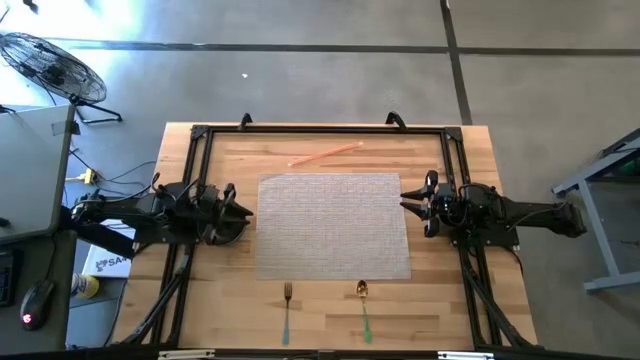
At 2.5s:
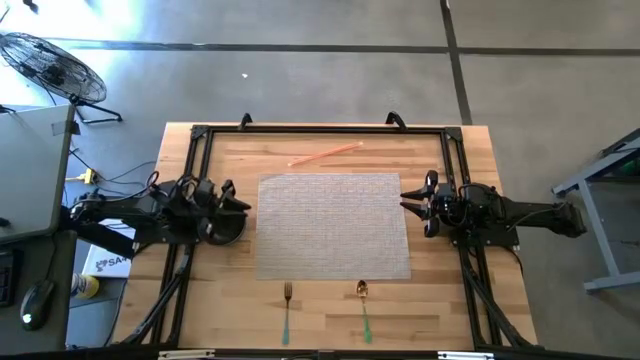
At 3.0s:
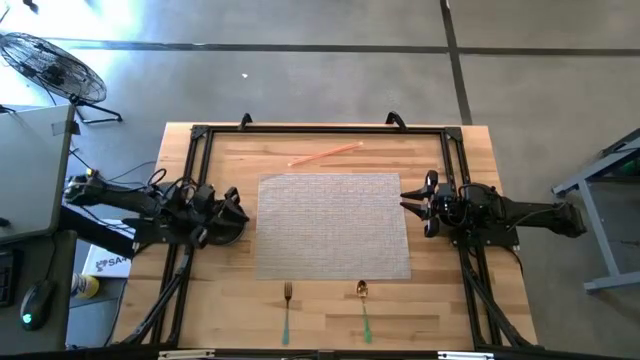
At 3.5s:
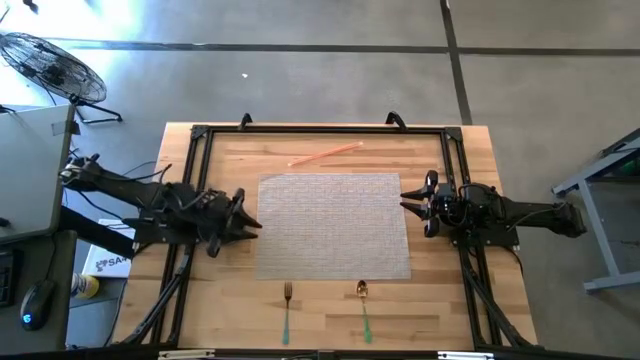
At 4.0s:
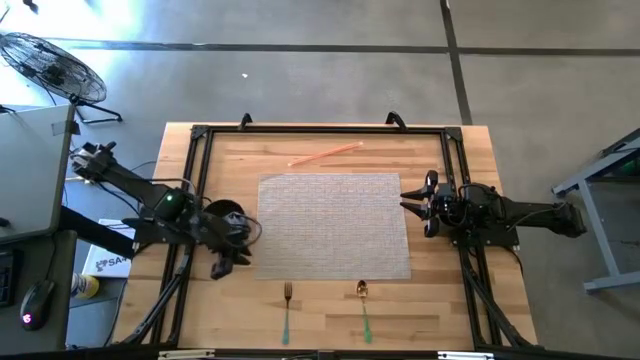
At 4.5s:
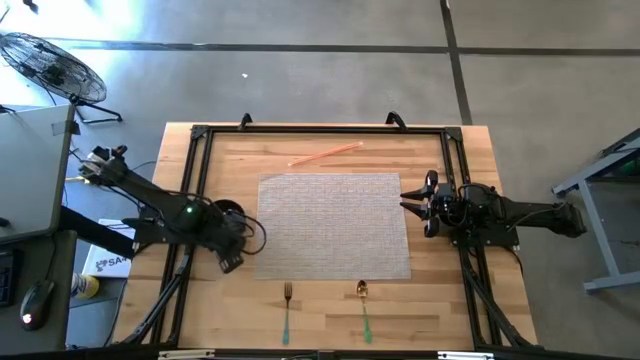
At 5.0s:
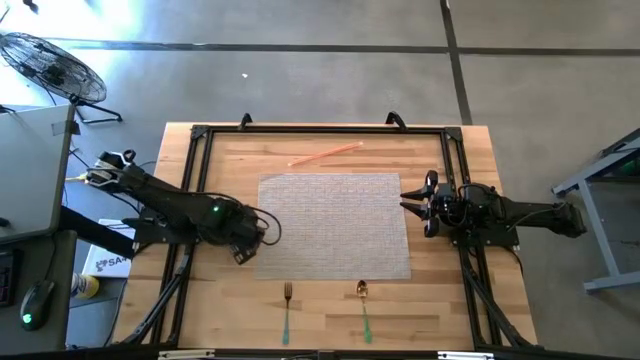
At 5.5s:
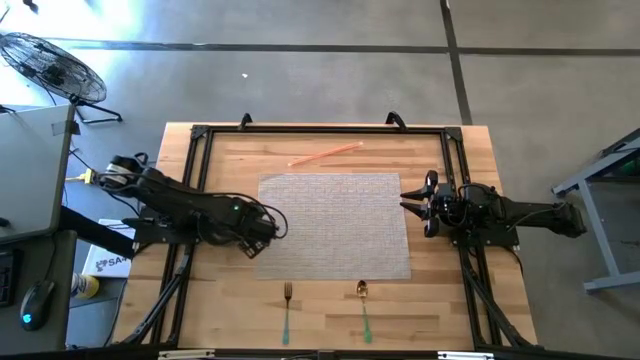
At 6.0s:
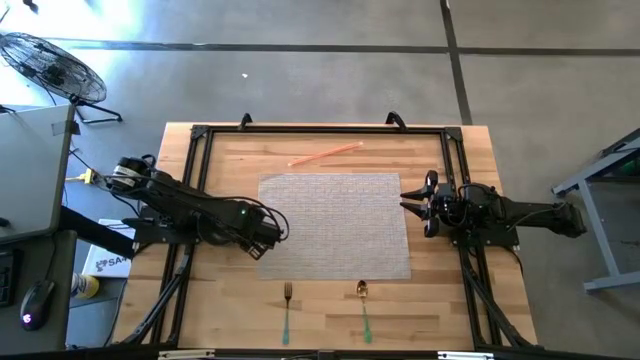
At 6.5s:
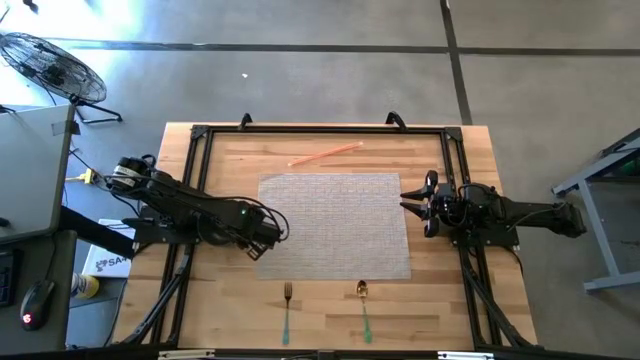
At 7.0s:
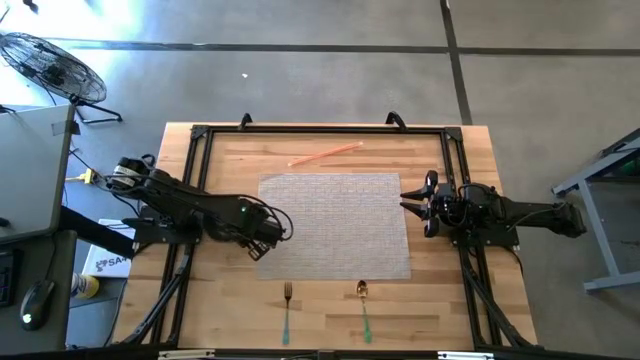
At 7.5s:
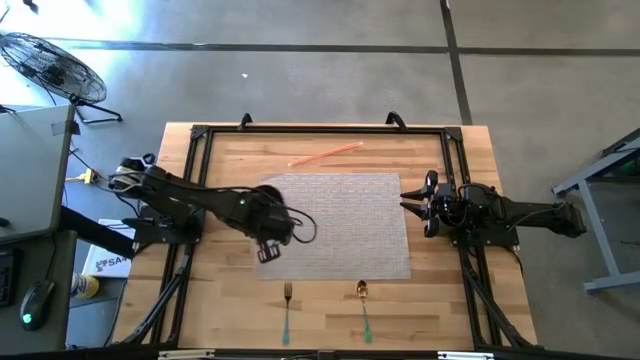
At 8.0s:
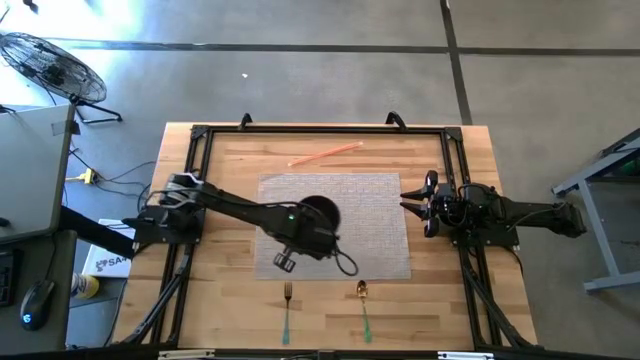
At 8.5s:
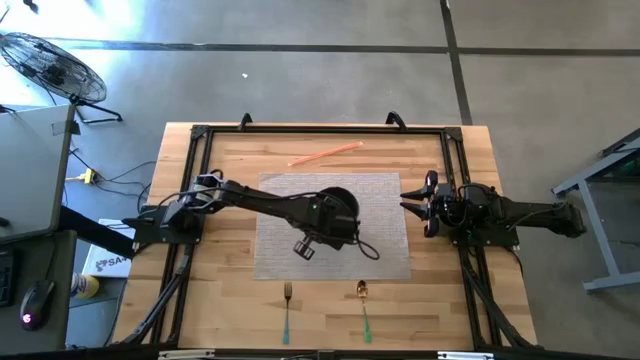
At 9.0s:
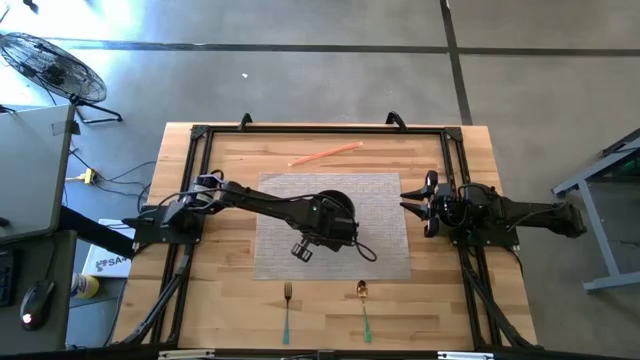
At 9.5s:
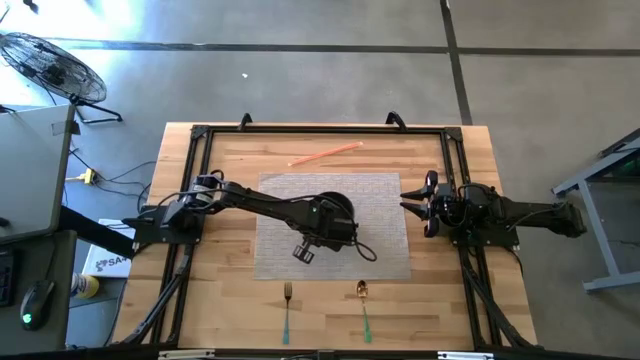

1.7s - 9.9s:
Task: Pick & Place Utensil
Put the black bowl on the gray mat

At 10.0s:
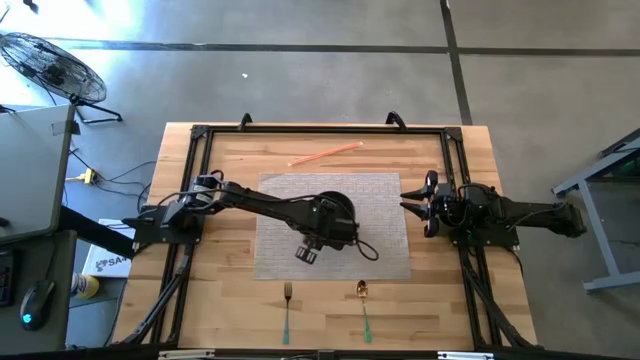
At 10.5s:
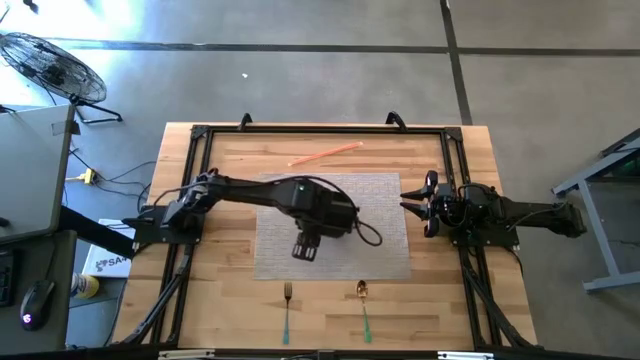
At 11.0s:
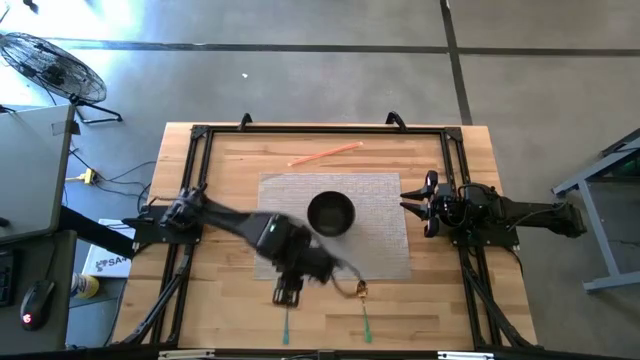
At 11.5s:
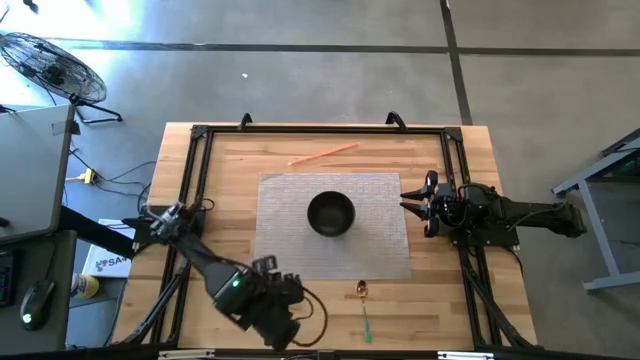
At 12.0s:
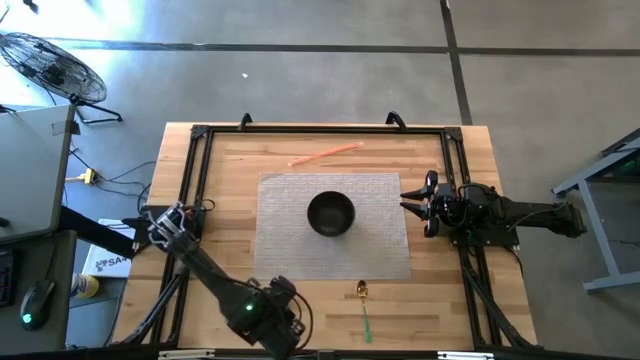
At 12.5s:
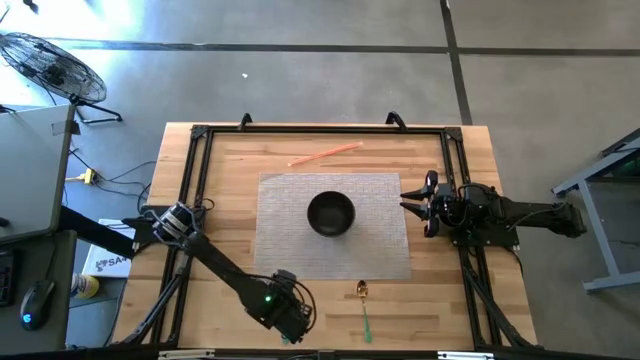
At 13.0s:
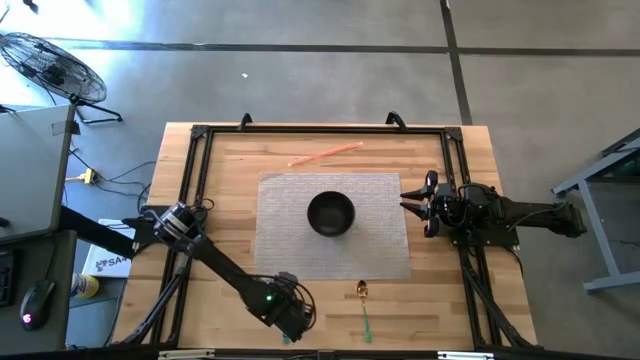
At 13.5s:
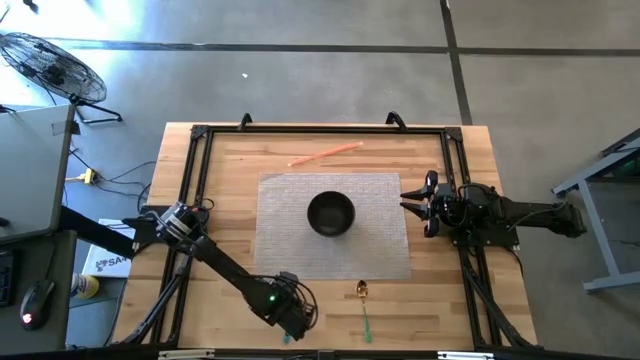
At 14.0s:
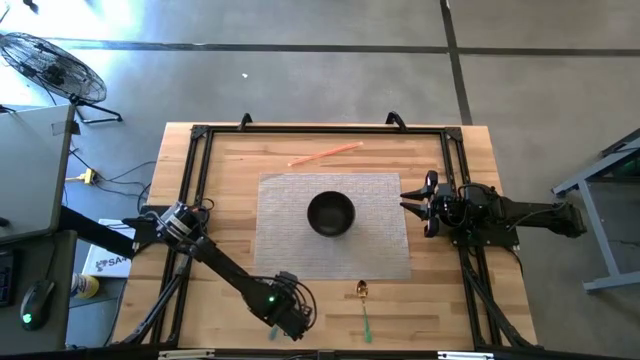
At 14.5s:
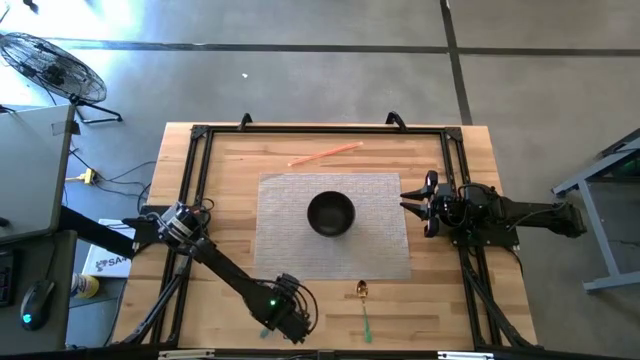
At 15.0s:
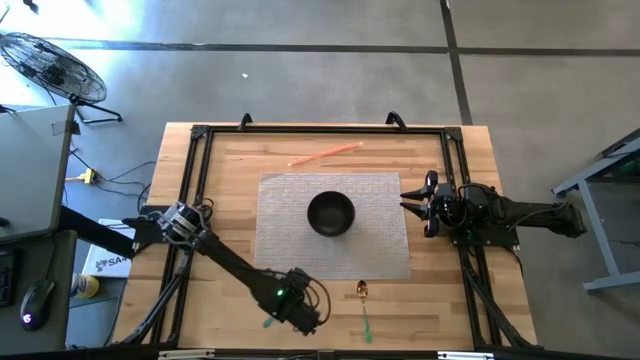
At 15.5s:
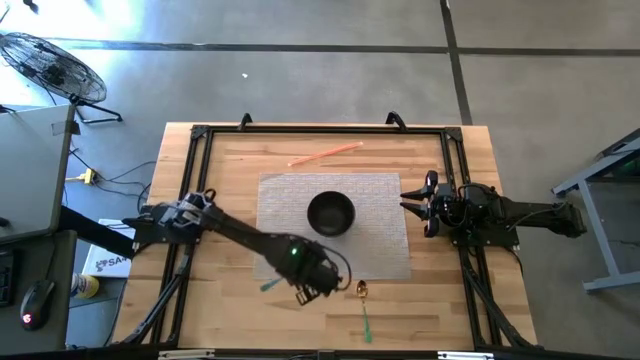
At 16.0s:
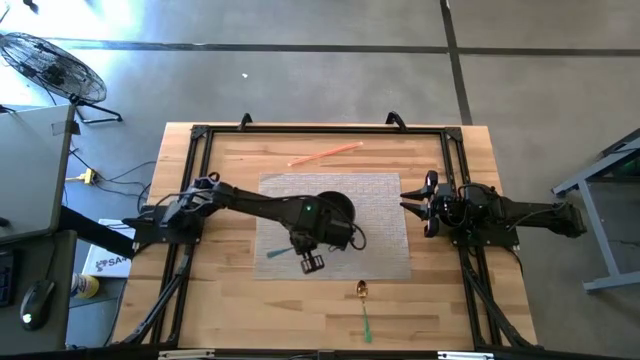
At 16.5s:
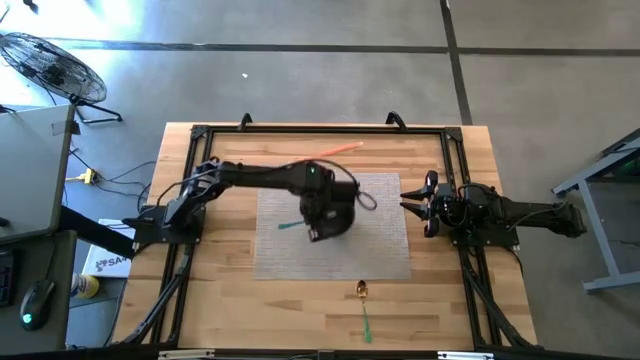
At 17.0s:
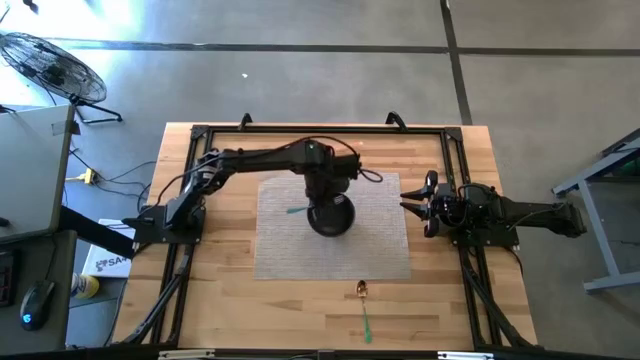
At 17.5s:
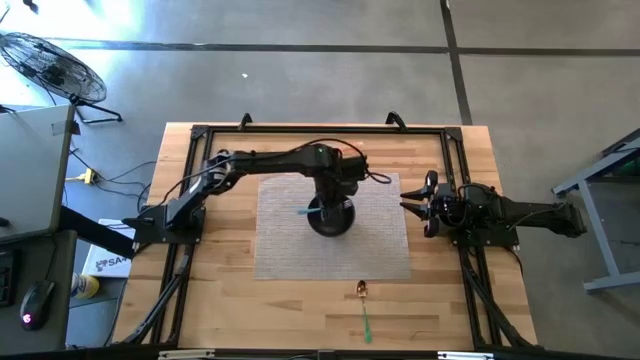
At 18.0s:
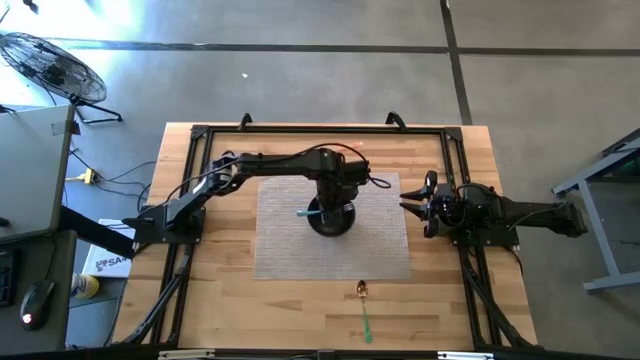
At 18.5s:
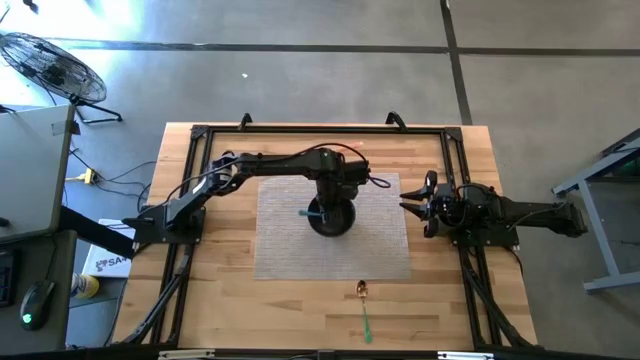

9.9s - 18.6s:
Put the blue fork into the black bowl

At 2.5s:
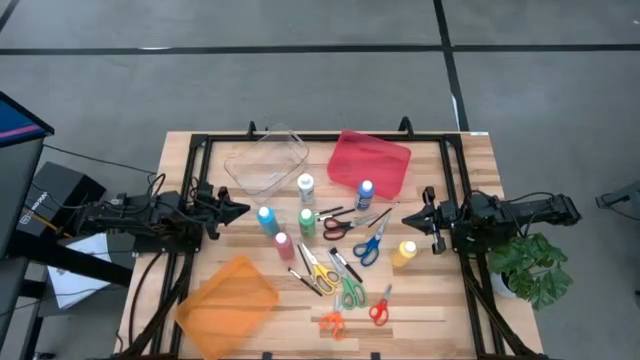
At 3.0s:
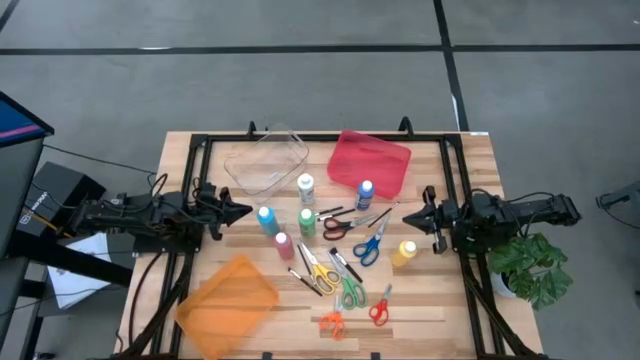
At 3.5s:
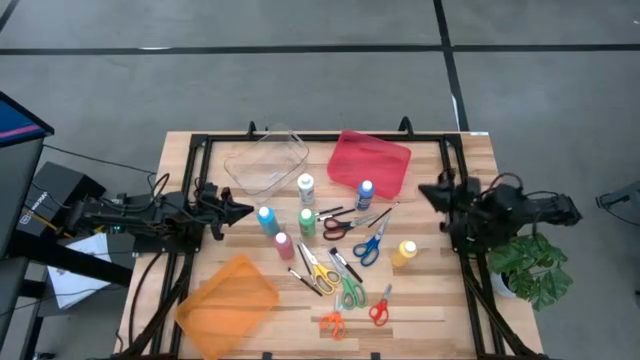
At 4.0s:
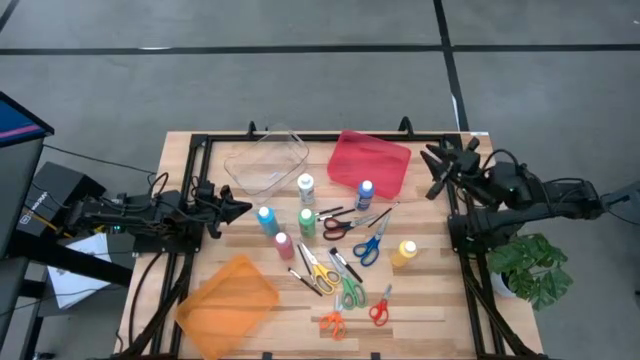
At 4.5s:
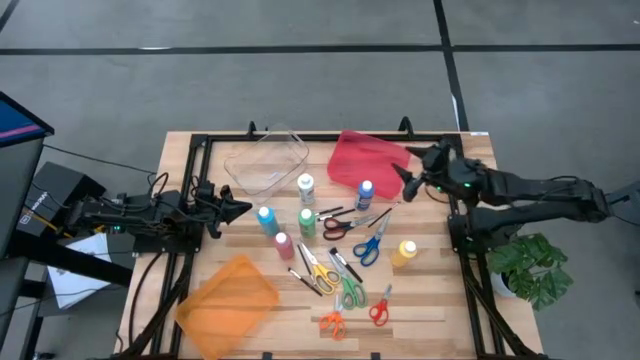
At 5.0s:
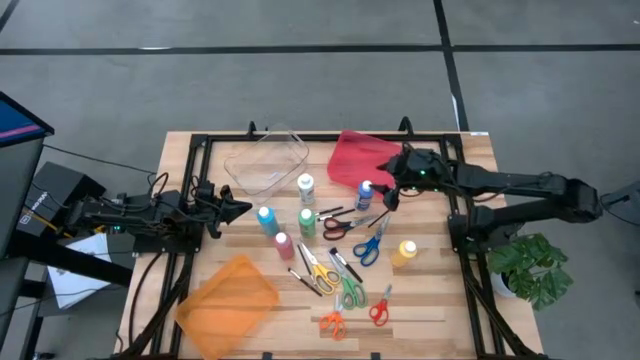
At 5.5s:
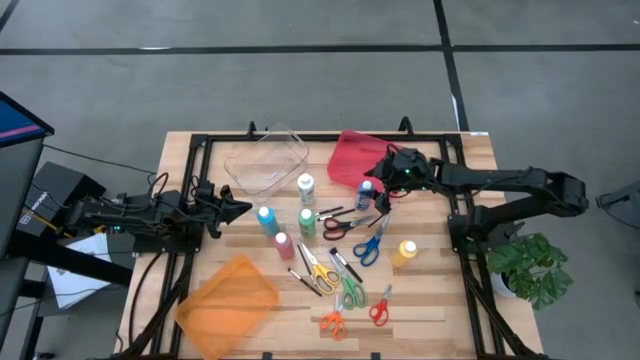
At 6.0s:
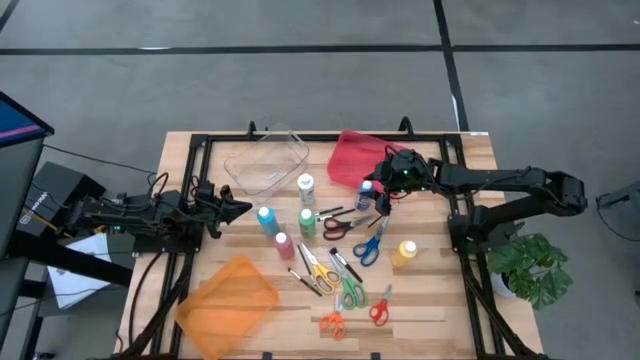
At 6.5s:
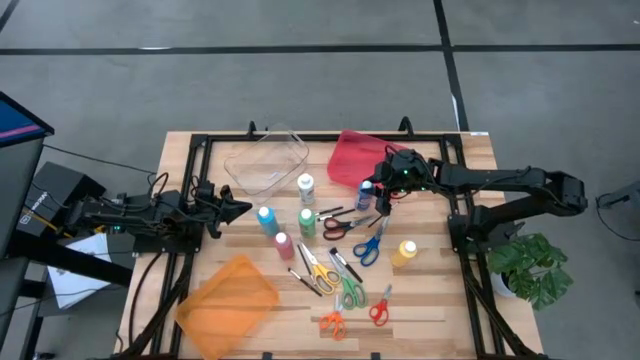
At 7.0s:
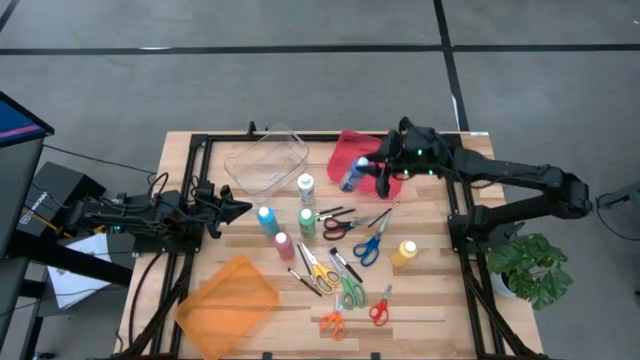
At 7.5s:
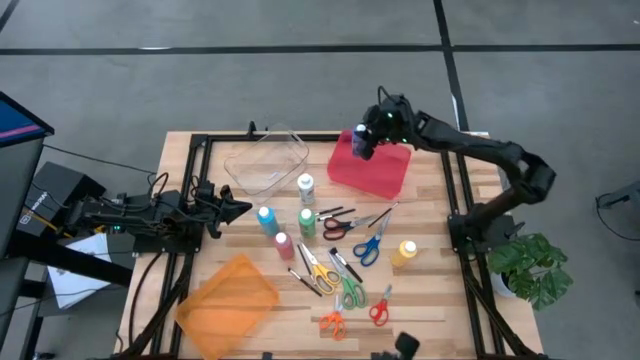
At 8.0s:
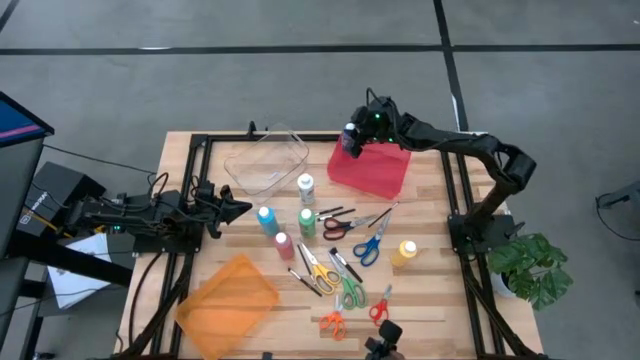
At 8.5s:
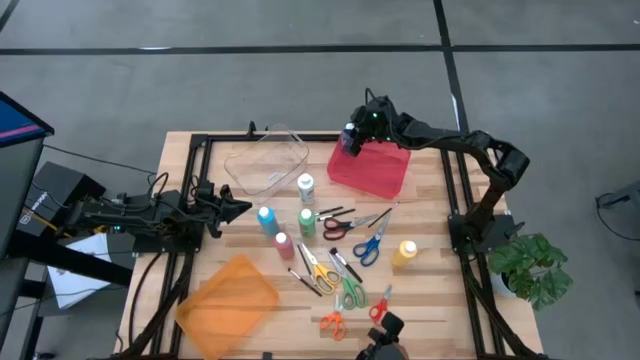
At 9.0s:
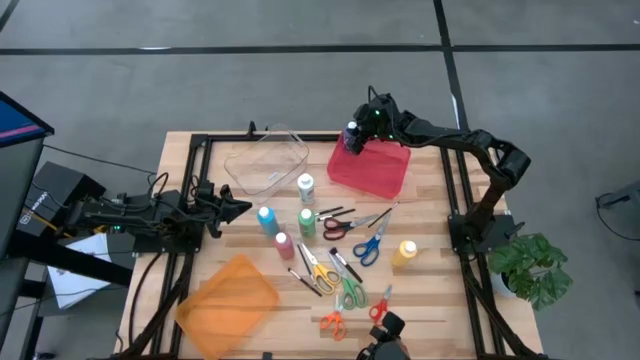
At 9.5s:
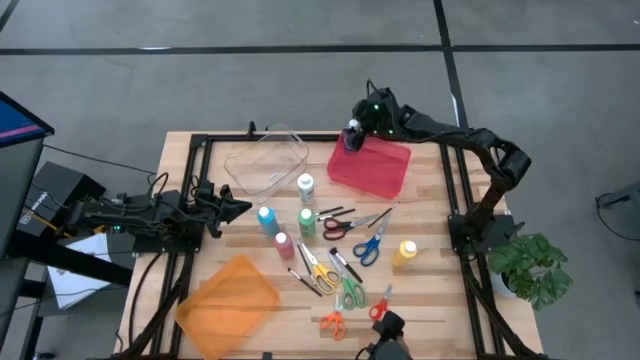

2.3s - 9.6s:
Task: Pick & Place Paint Supplies
Put the blue paint bottle into the red bin
